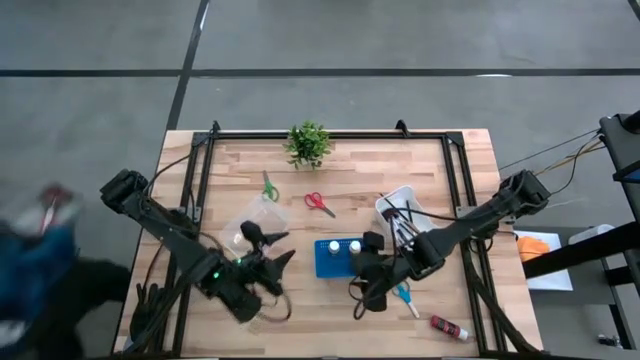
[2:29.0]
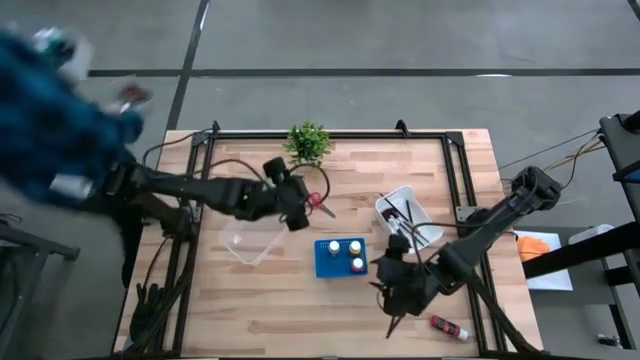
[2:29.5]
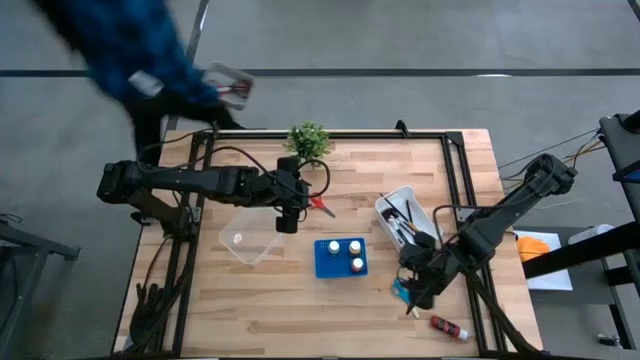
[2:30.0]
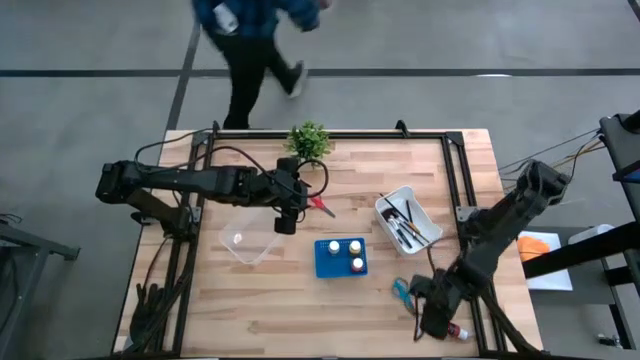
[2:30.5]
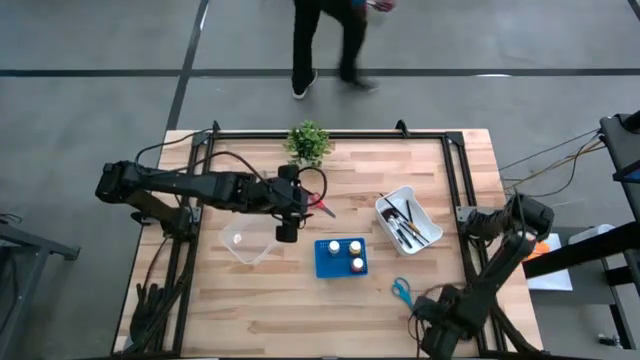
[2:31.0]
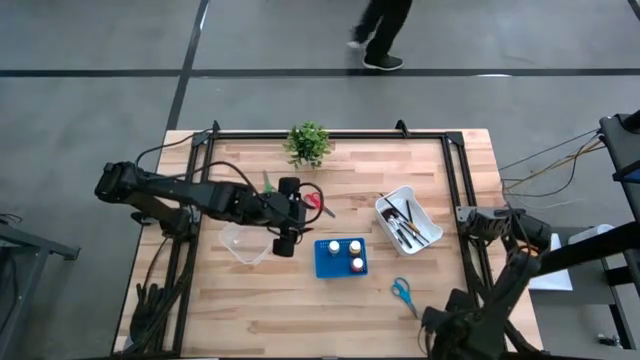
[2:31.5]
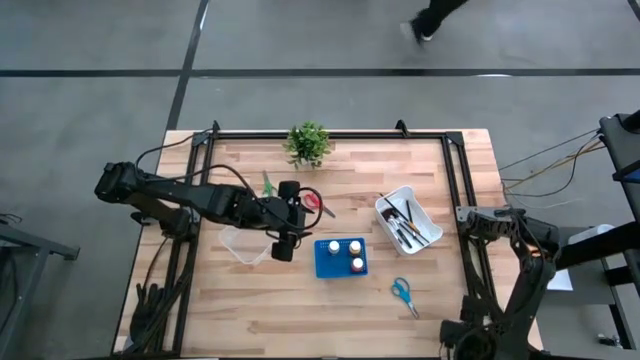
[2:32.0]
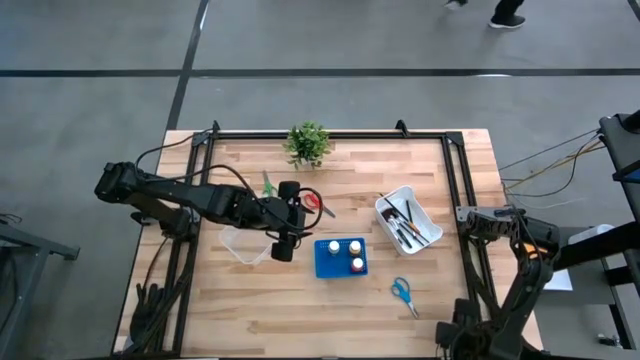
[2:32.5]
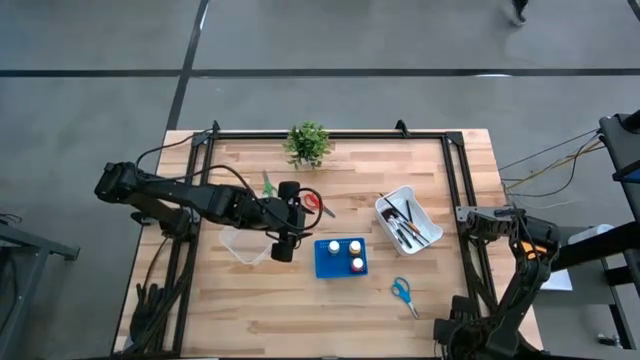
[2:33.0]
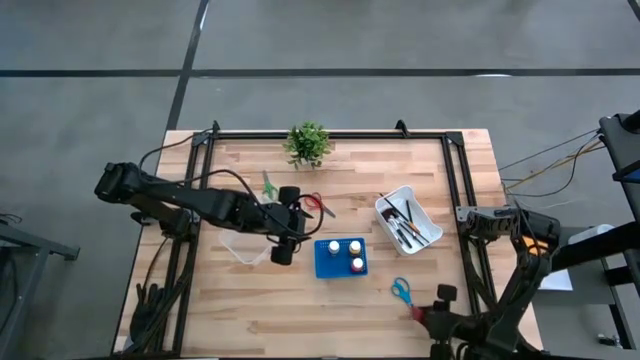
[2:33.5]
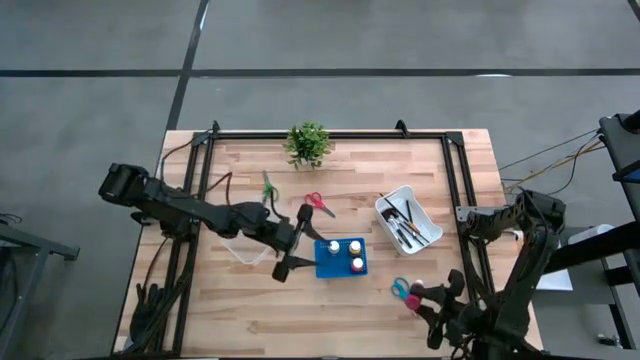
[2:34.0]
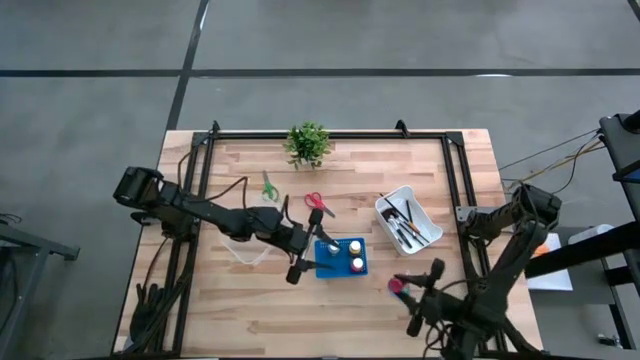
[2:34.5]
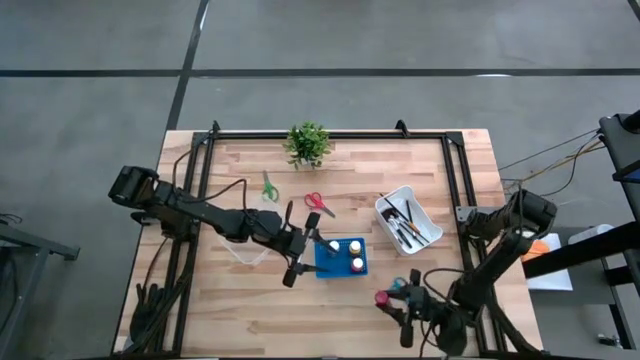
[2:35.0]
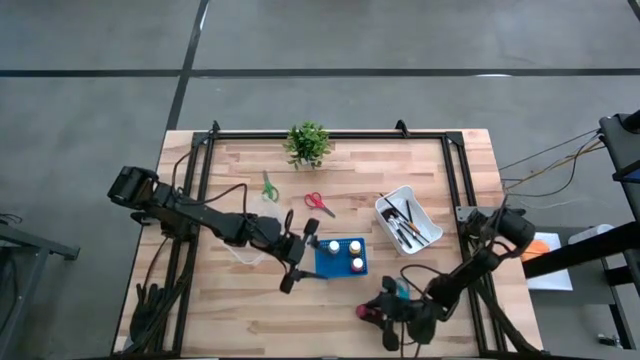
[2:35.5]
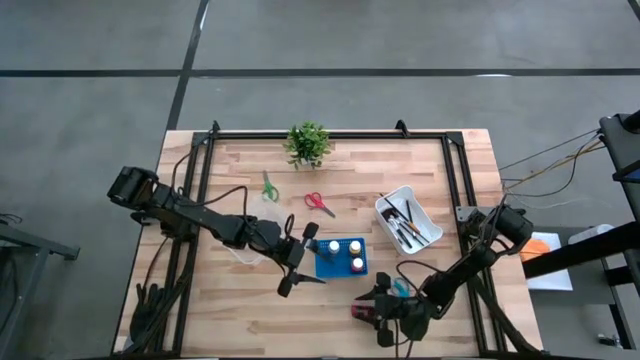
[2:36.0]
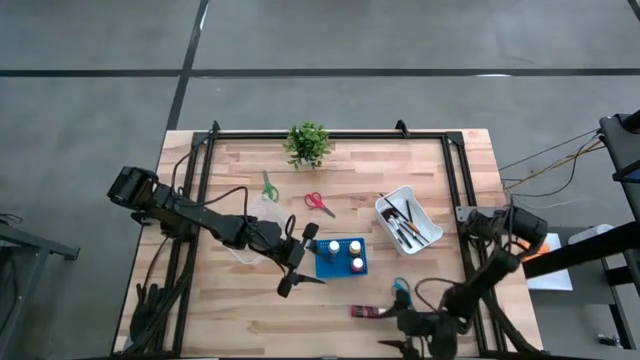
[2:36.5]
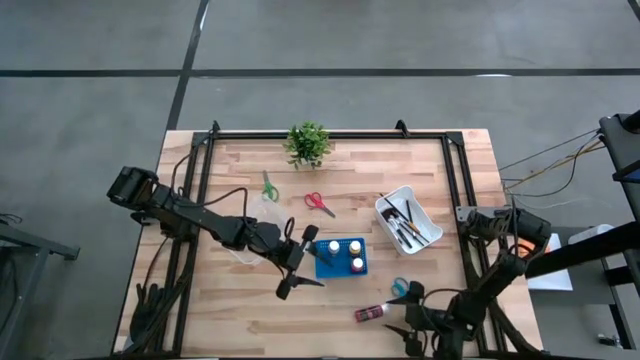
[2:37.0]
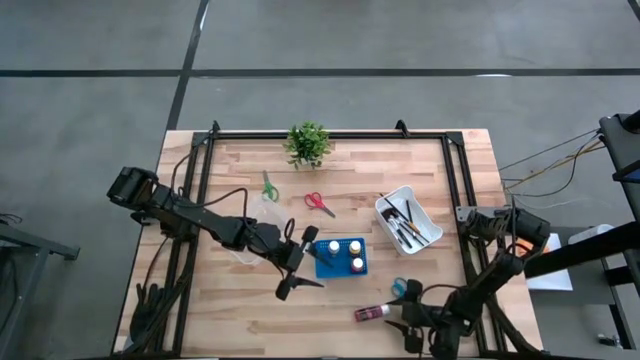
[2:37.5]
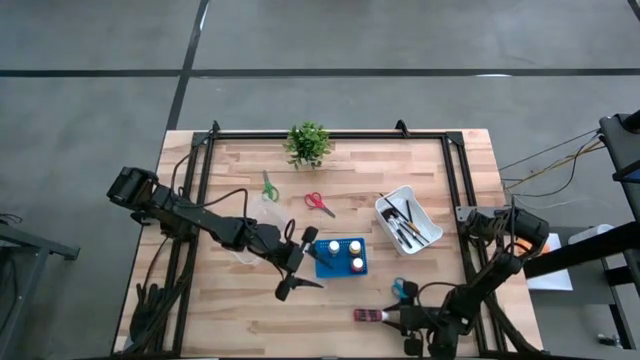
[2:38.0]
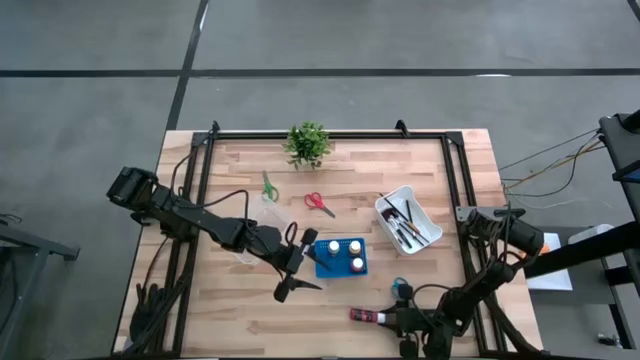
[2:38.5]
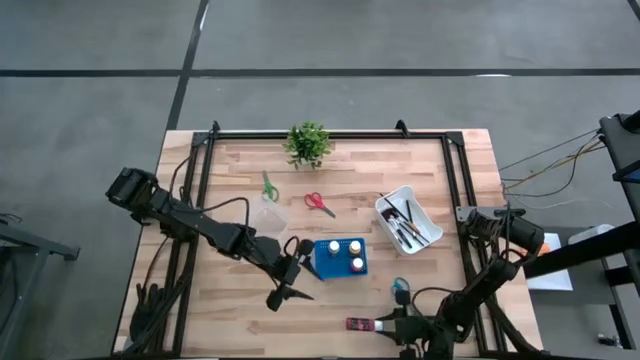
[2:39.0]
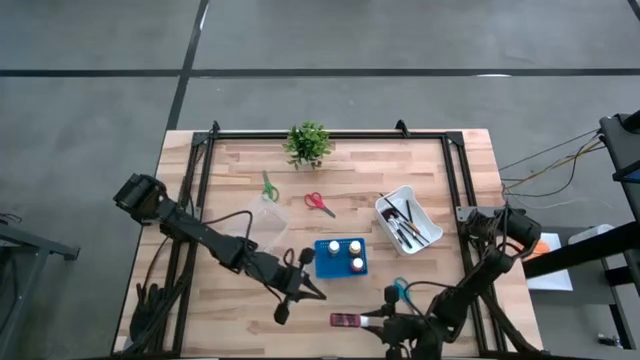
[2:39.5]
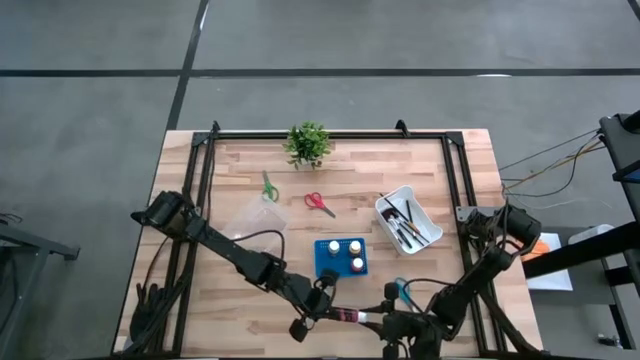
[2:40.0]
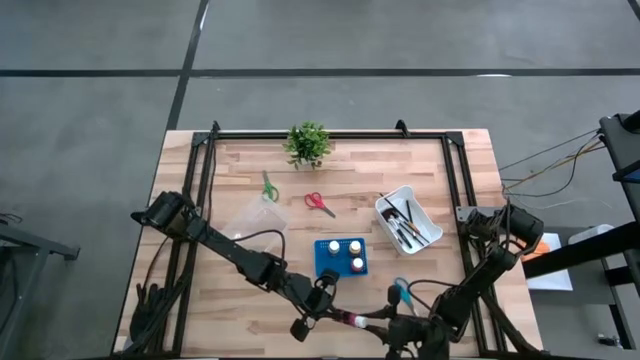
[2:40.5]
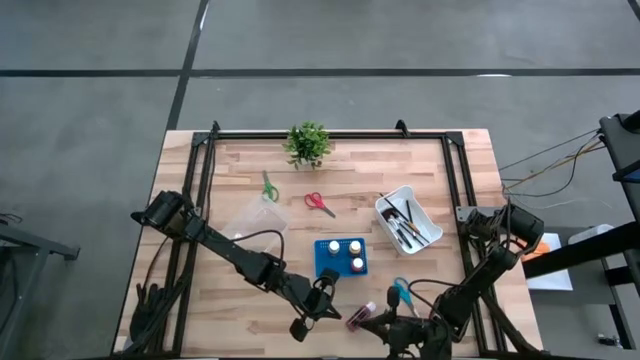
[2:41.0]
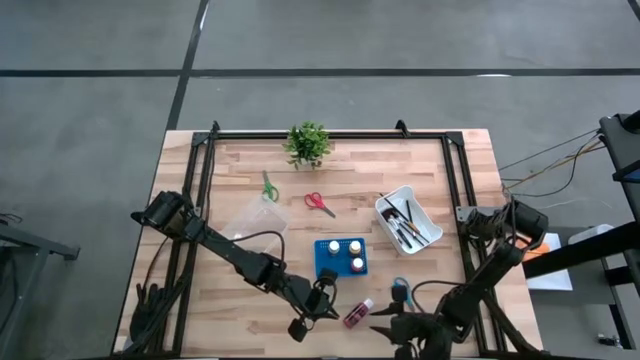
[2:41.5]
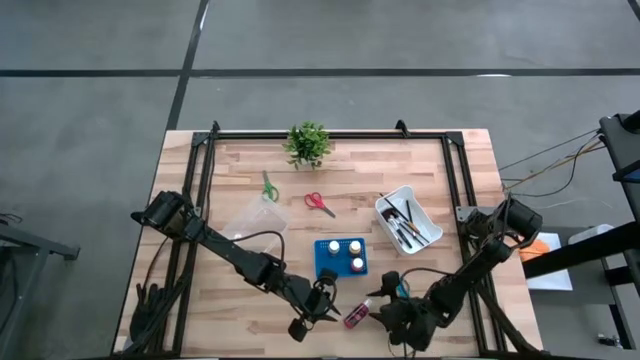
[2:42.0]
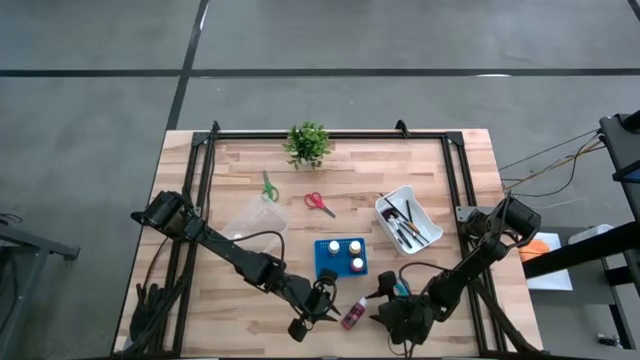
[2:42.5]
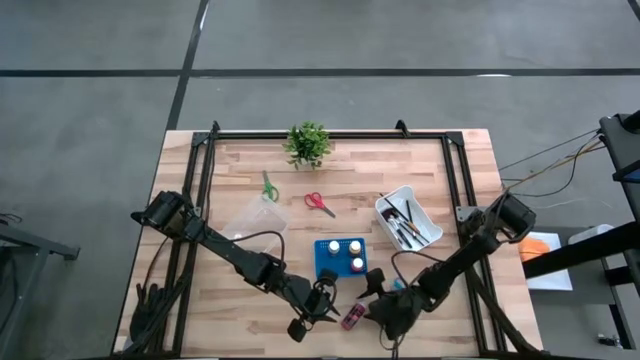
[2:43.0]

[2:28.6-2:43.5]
Task: Pick & Place Paint Supplies
Put the red paint bottle in the blue bin

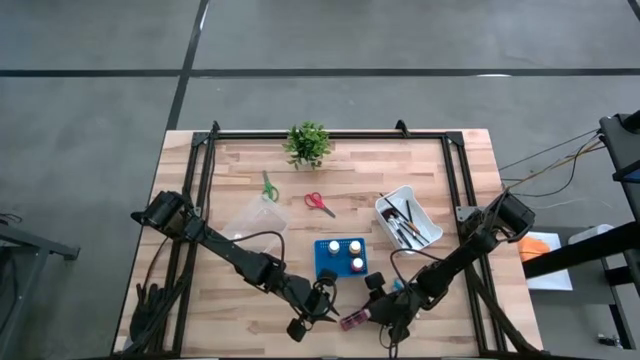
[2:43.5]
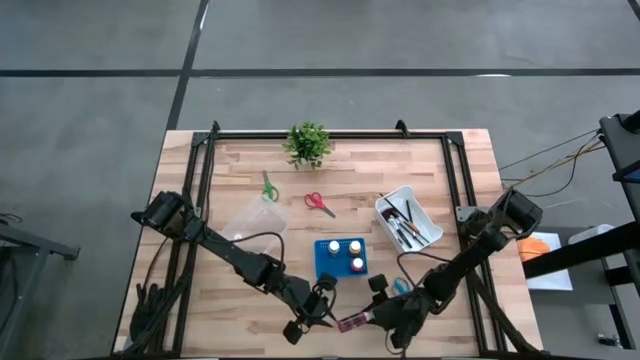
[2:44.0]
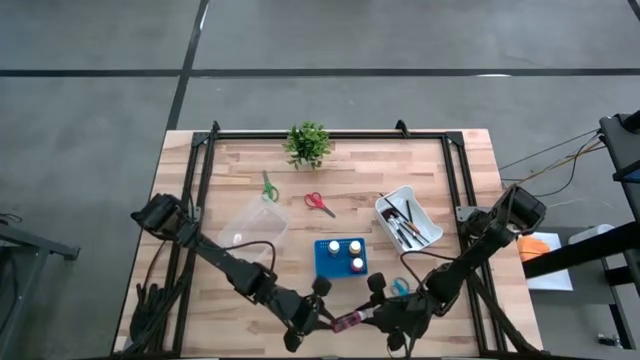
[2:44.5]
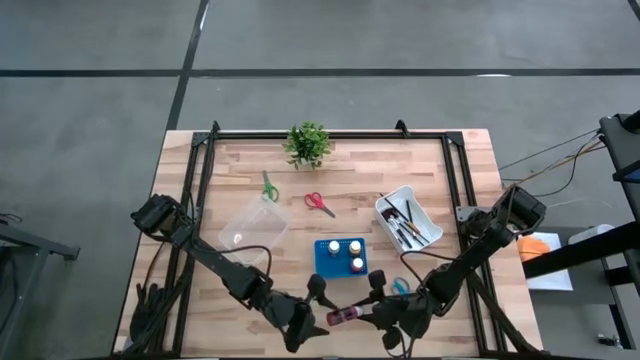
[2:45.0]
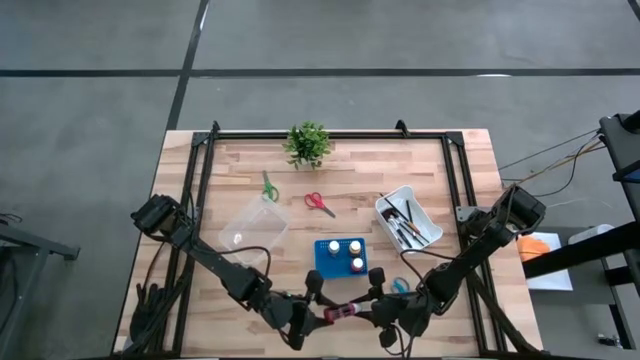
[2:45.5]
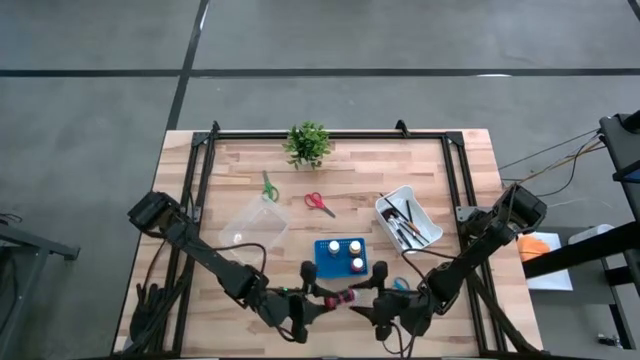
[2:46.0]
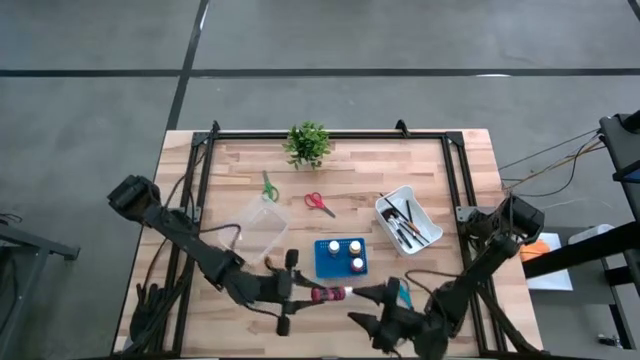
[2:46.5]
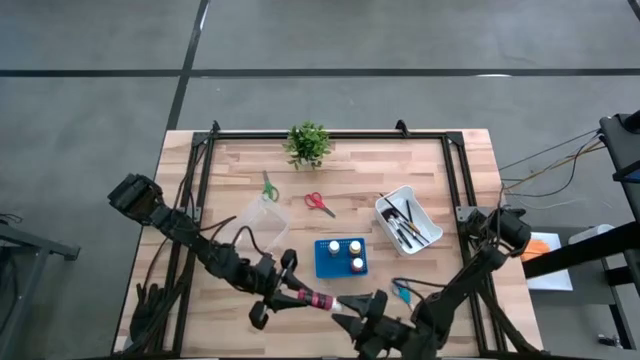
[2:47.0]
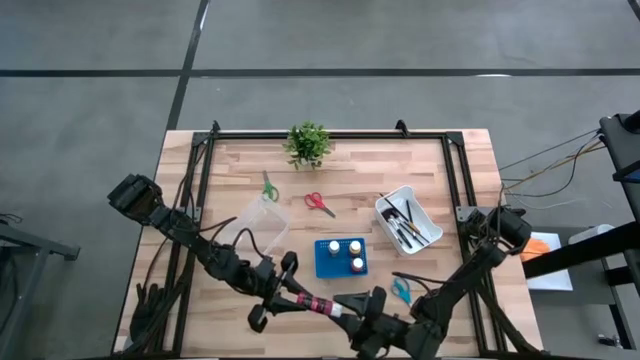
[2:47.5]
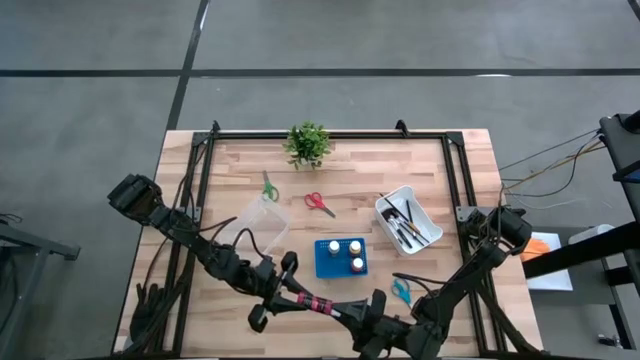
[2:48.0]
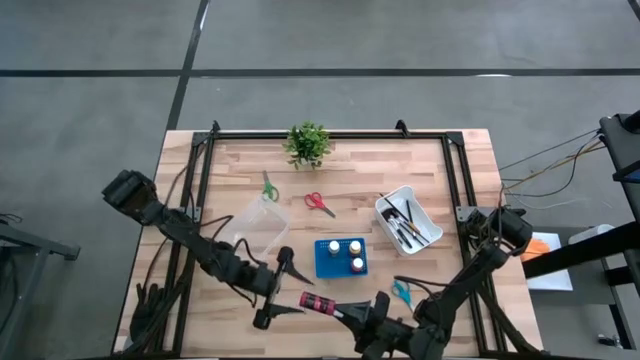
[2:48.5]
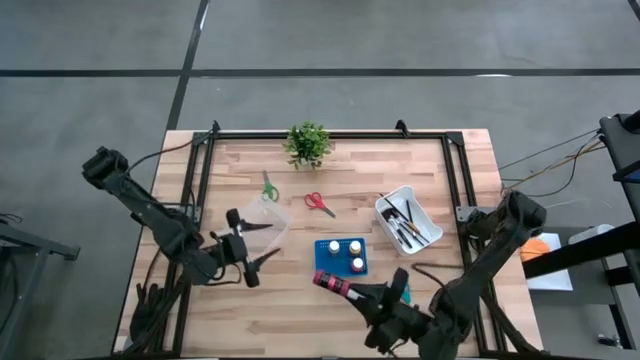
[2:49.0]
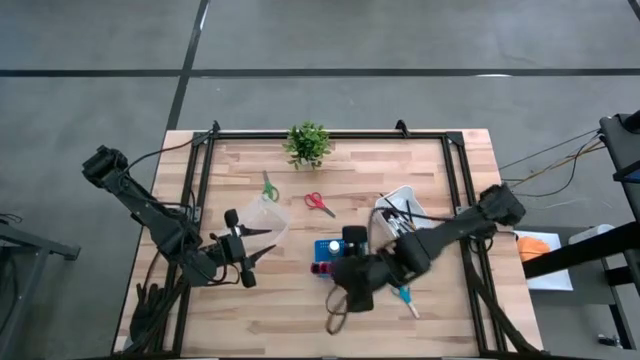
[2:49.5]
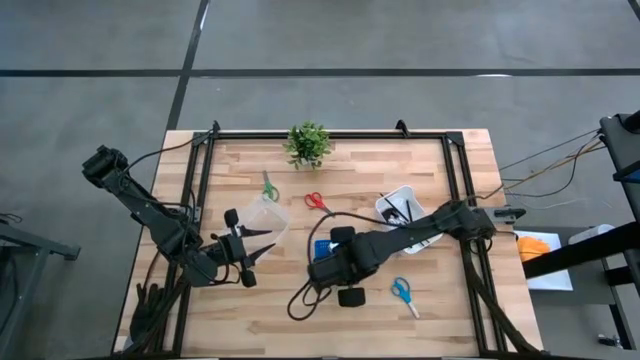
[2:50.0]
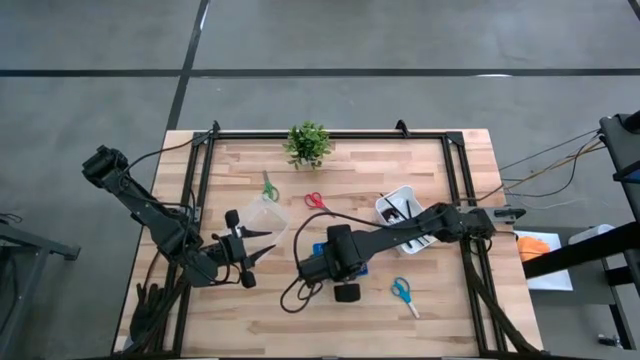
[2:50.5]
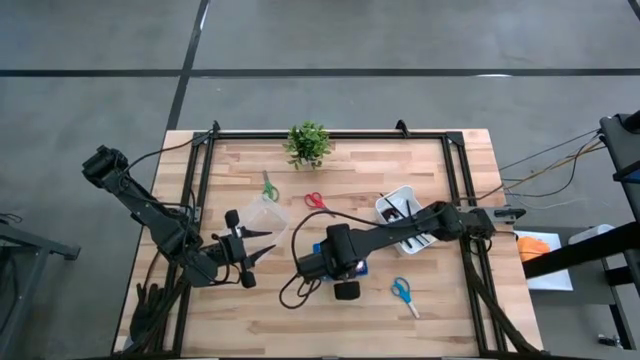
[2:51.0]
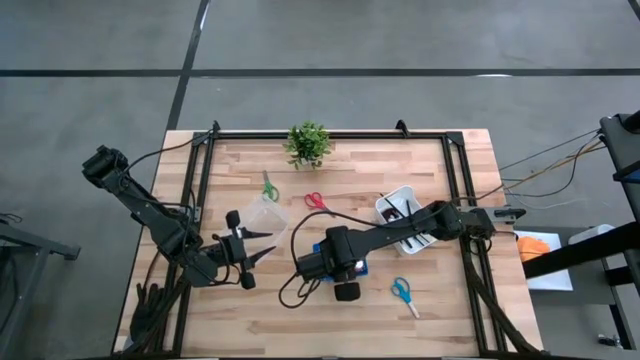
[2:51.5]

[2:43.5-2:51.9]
Put the red paint bottle in the blue bin
